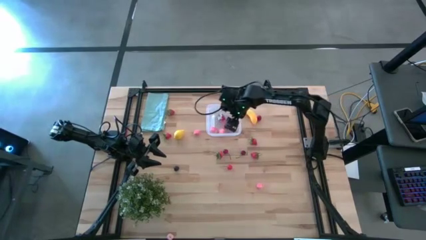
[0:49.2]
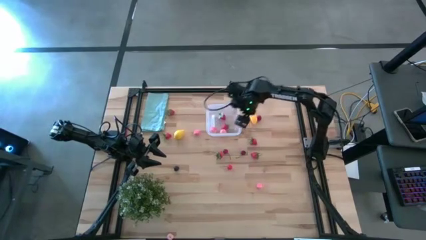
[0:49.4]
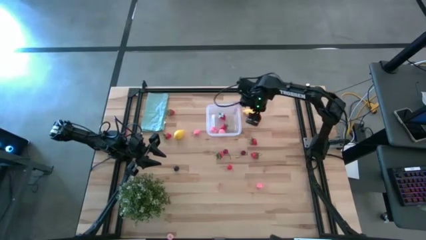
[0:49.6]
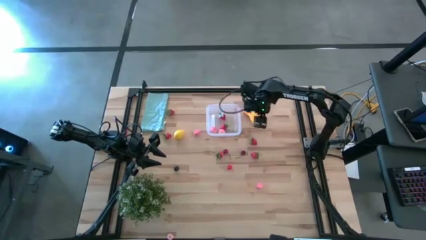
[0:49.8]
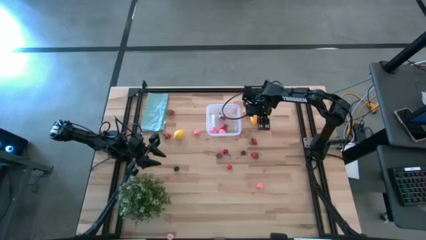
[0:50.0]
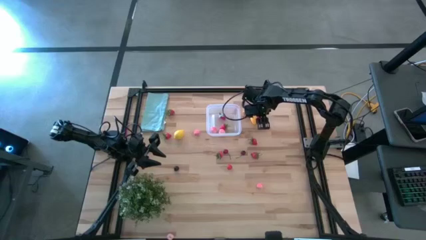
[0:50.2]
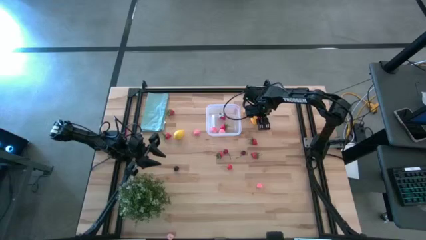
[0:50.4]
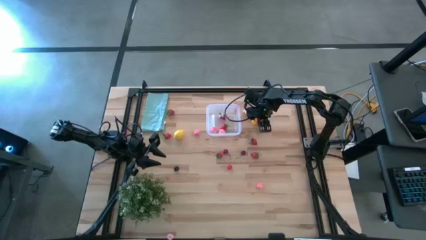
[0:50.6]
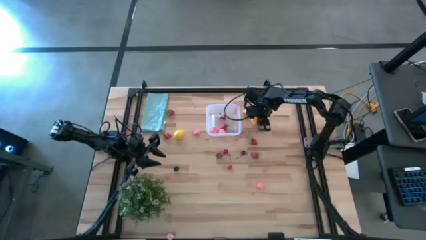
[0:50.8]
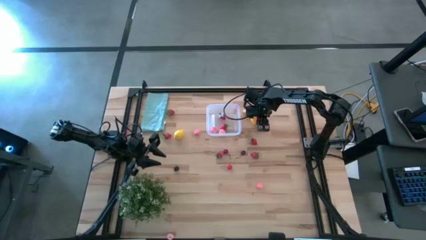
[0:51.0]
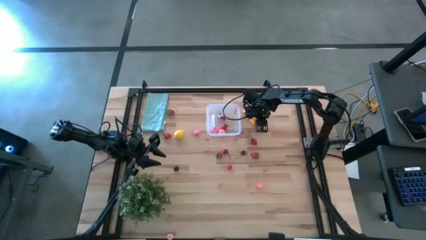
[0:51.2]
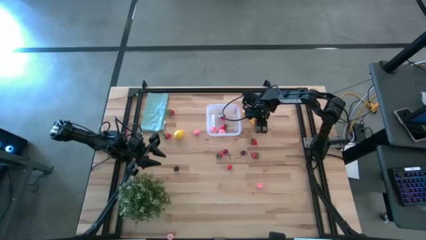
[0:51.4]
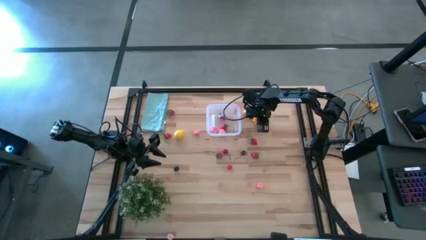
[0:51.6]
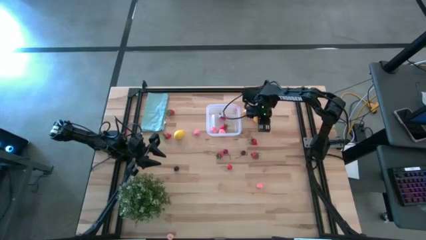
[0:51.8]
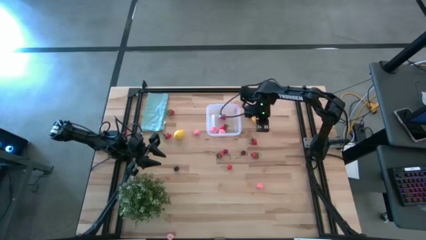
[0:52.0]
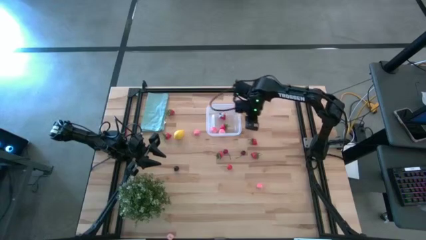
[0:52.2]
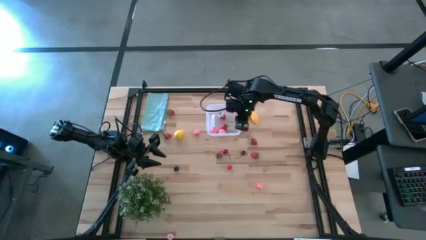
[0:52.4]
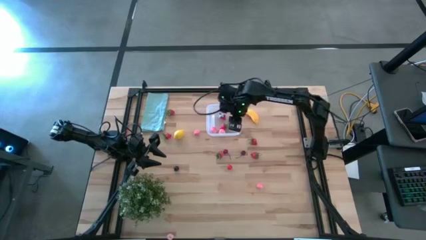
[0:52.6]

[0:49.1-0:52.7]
Task: Pick and placing Produce into tupperware
Put the red cherry into the transparent bin

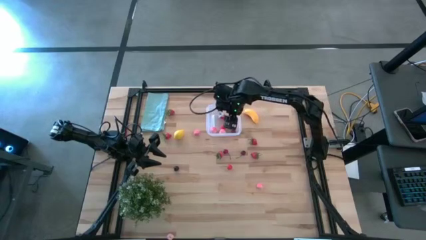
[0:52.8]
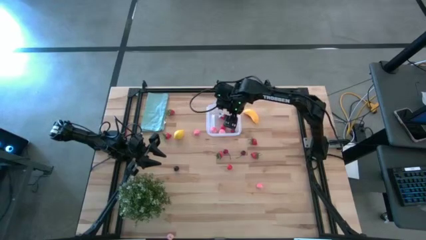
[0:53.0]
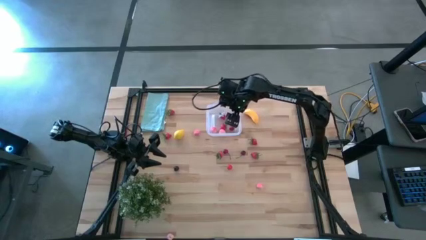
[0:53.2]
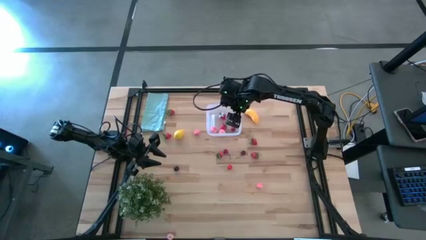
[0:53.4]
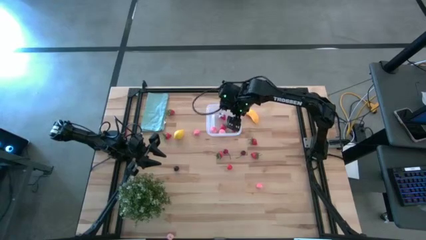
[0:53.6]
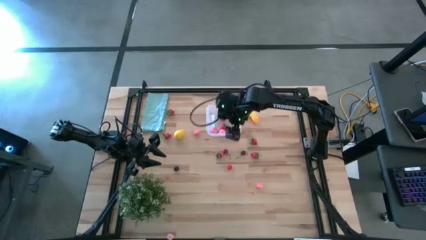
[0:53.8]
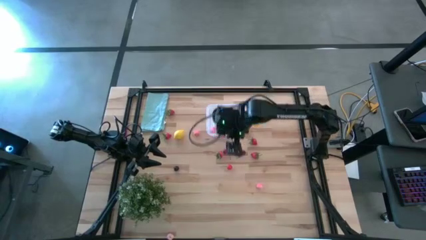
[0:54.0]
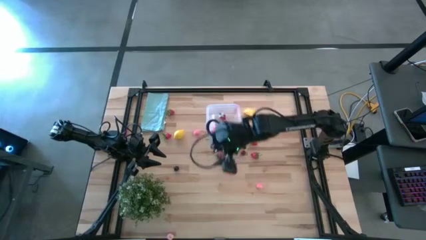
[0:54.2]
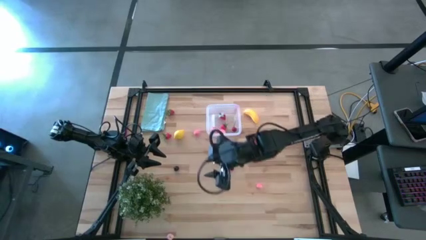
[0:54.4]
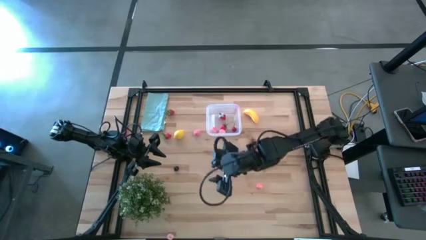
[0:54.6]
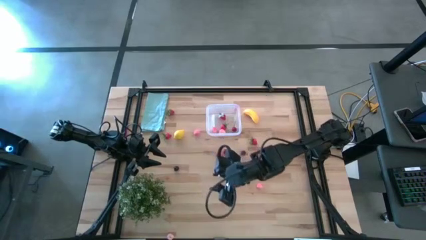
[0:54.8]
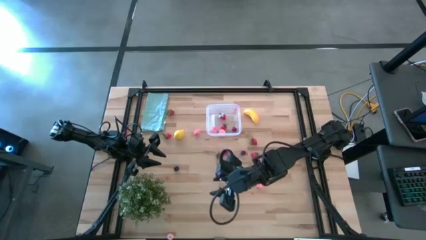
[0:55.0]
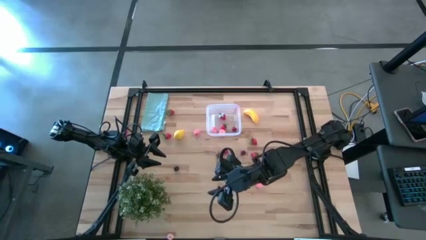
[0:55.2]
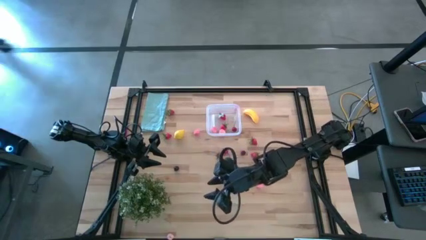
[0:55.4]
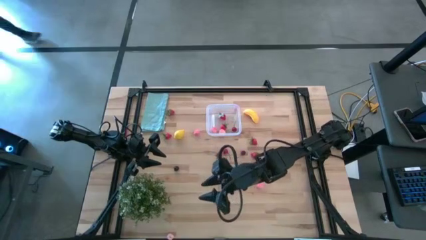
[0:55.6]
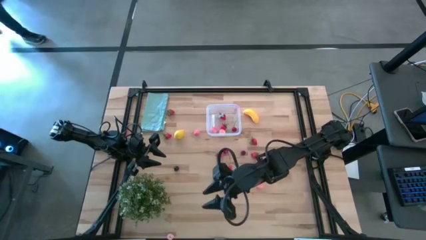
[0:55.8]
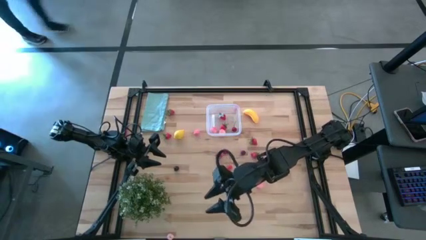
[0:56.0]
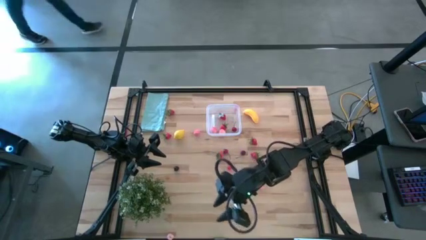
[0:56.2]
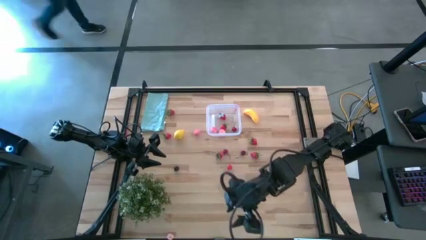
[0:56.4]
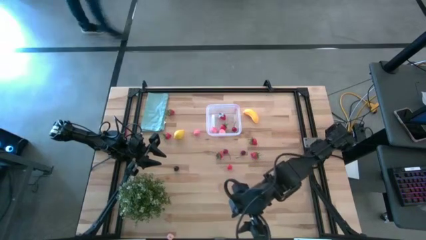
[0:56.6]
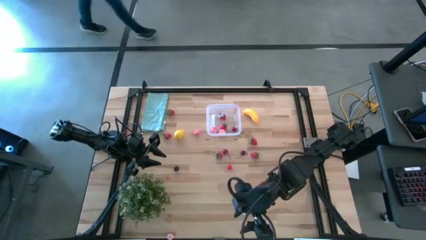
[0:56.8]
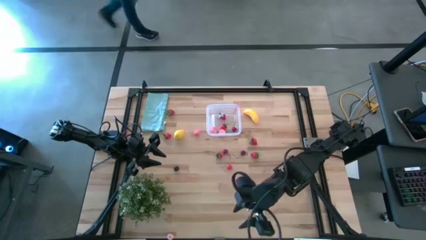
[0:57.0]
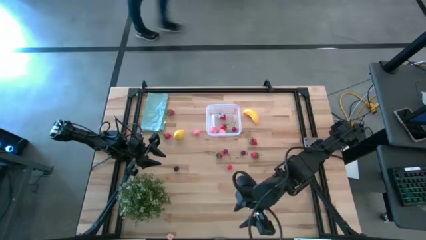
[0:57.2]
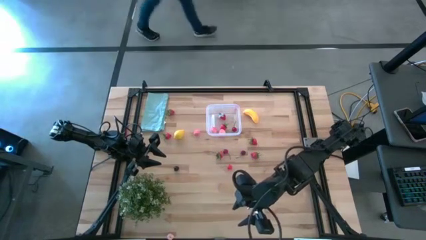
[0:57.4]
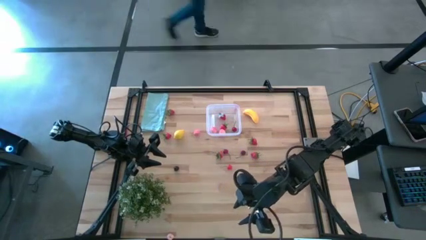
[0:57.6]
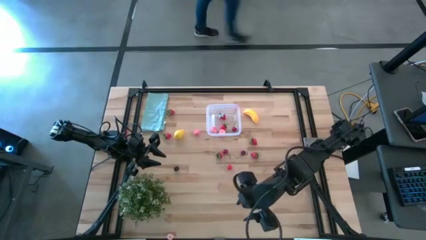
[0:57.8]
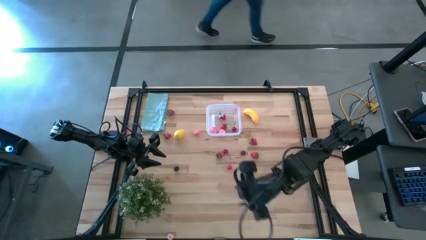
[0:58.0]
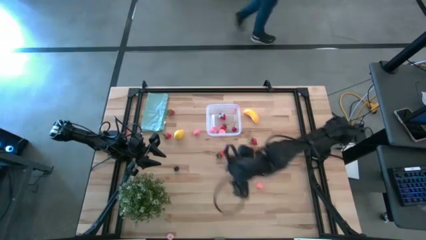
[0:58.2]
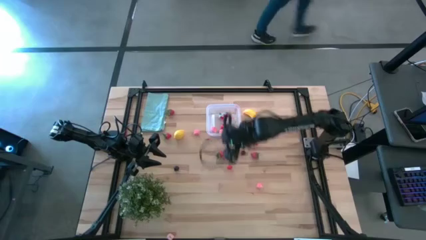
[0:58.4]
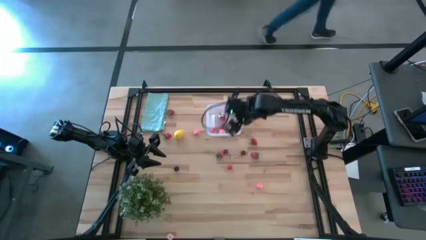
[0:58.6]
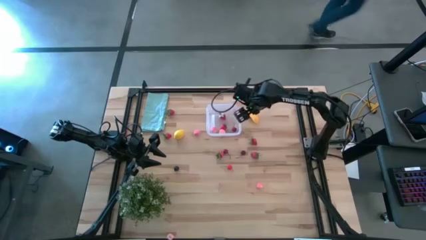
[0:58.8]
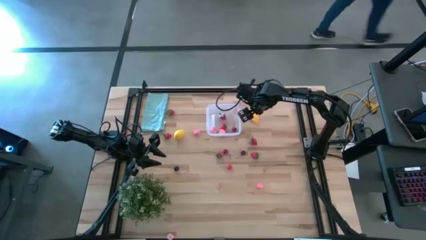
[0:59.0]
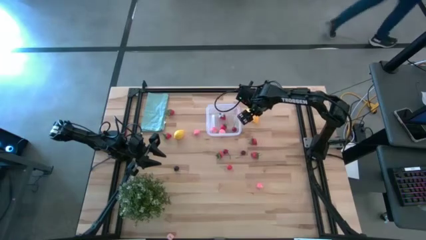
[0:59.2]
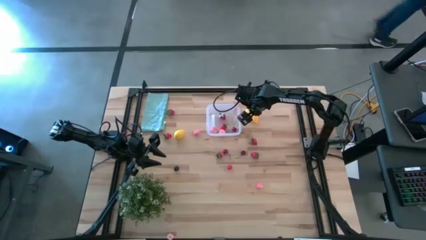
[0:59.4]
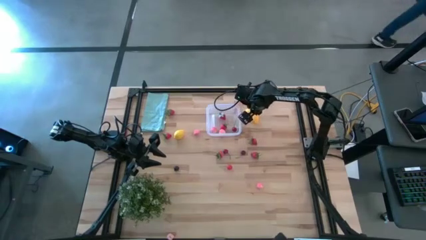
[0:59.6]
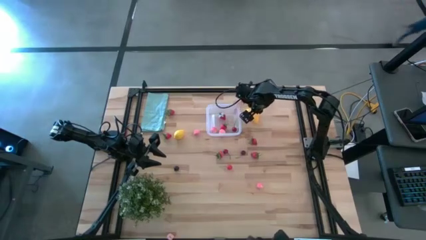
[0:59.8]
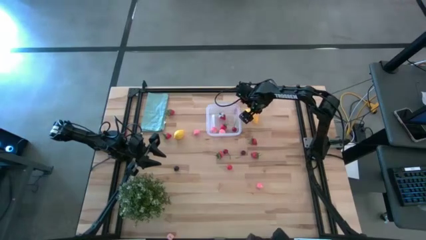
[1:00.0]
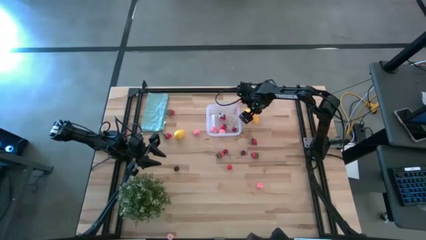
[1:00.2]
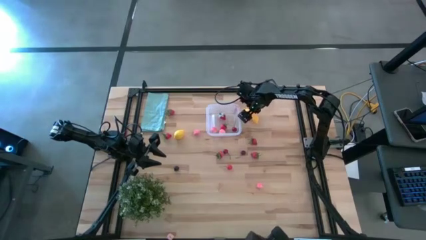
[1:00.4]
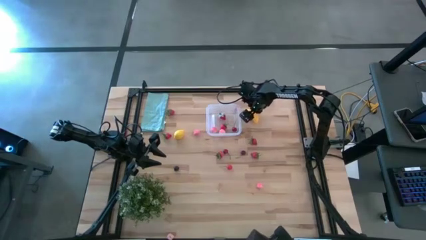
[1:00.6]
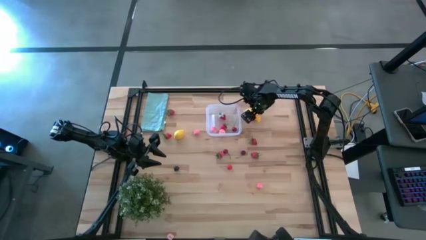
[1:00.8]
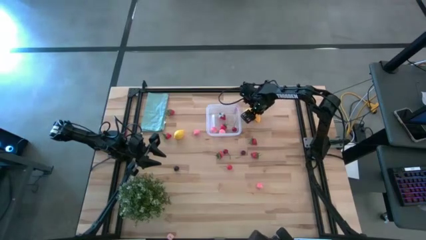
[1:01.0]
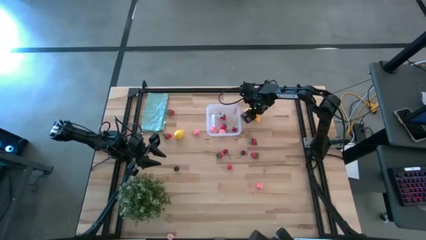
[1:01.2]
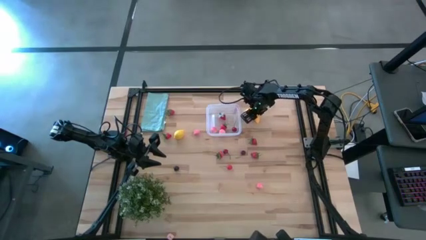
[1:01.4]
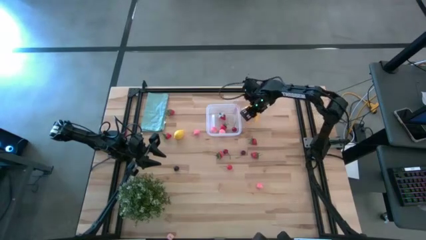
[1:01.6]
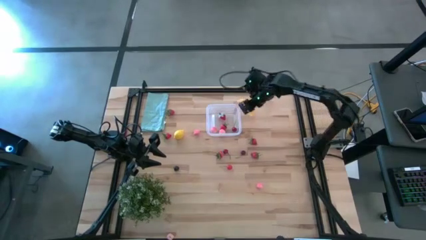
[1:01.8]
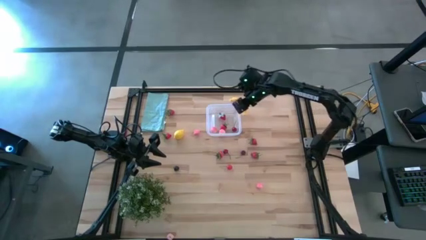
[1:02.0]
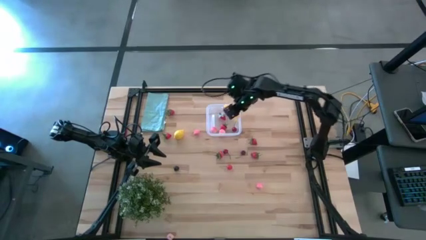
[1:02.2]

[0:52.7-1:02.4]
Put the yellow banana into the transparent bin

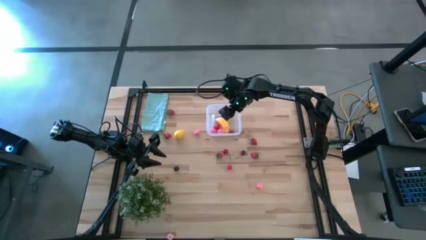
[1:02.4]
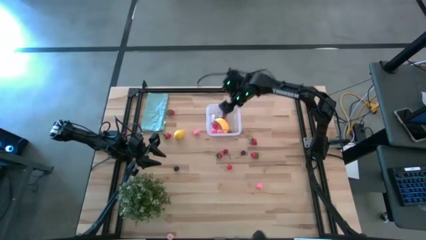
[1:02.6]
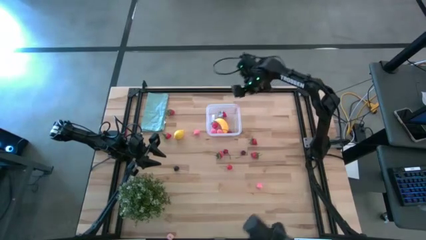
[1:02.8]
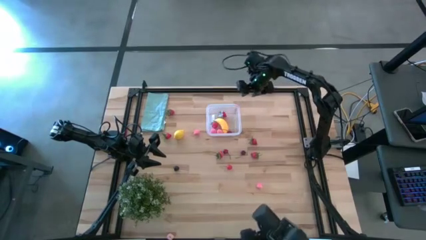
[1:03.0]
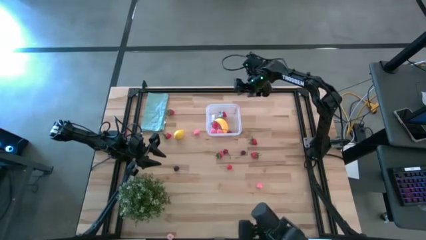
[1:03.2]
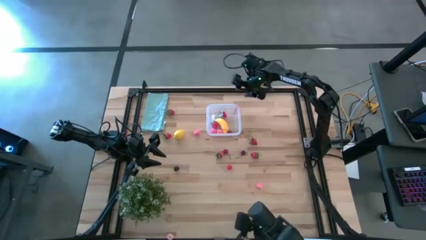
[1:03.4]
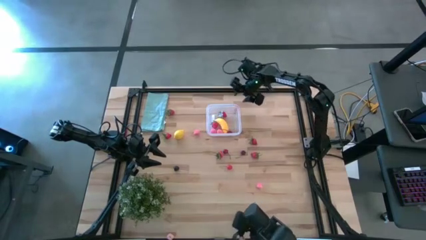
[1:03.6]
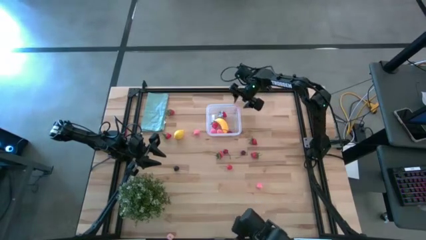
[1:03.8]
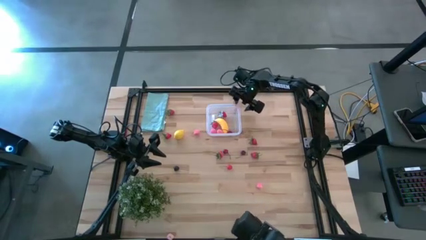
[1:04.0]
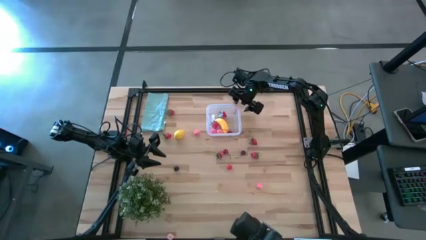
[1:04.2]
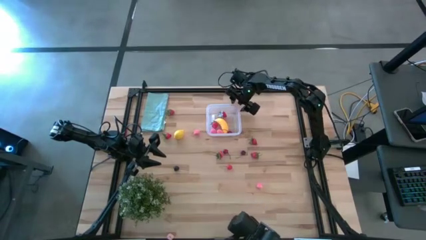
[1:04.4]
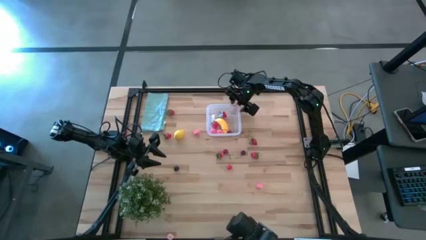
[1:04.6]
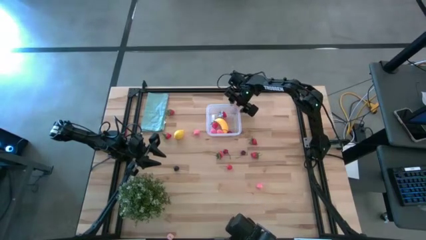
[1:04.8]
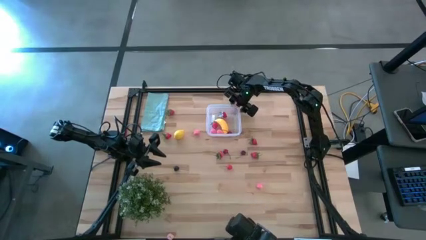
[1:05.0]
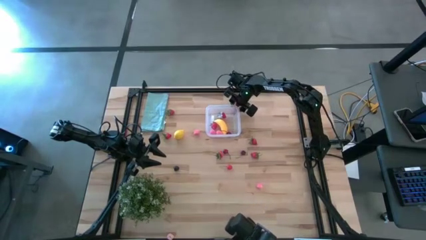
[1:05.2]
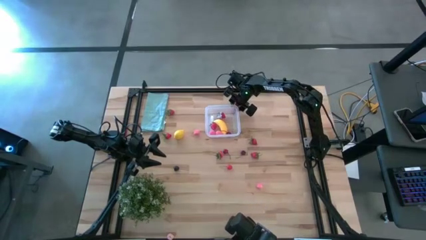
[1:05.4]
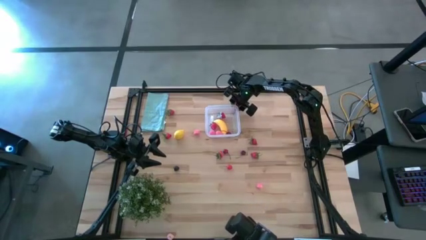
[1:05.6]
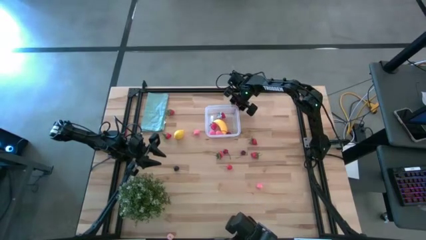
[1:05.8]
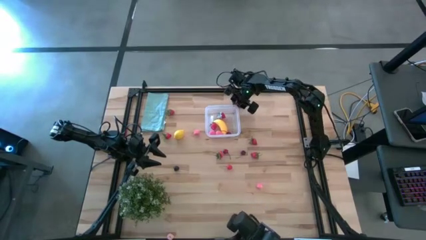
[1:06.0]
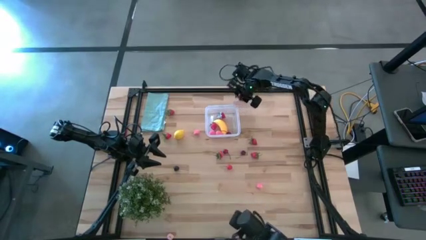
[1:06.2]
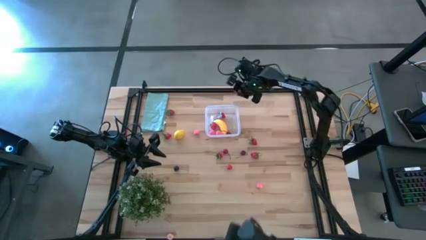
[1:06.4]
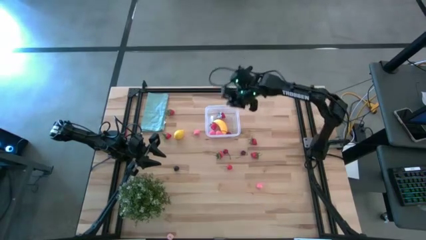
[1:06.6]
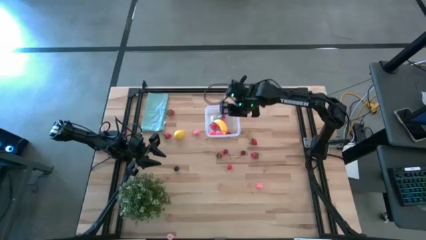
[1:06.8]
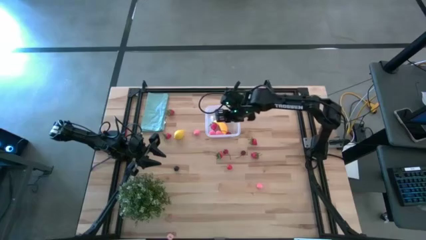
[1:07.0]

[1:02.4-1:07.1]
Put the pink peach into the transparent bin
